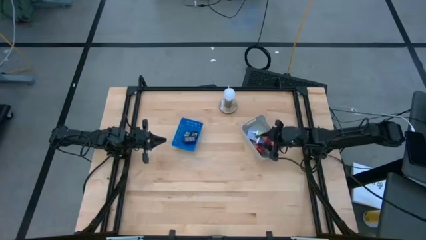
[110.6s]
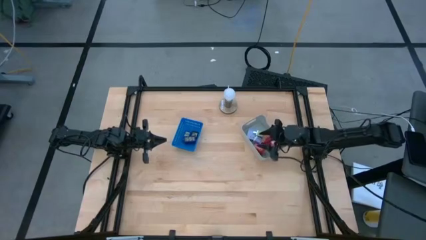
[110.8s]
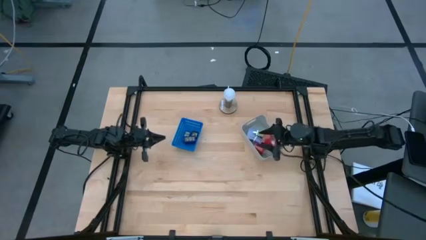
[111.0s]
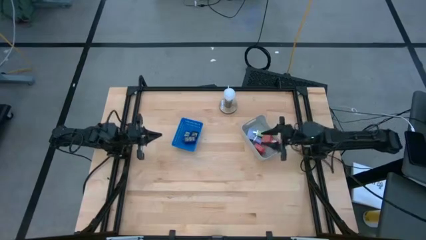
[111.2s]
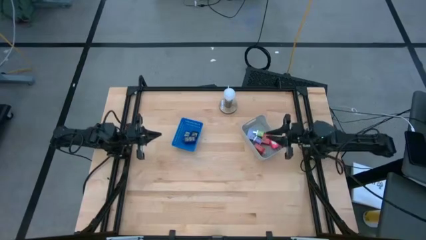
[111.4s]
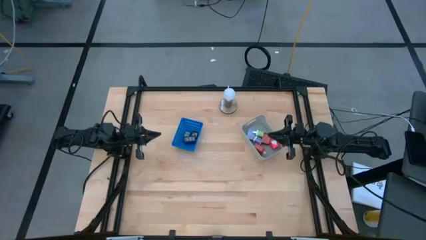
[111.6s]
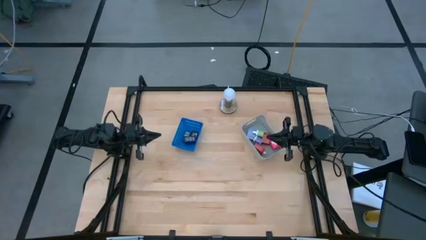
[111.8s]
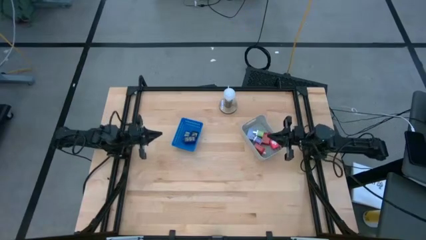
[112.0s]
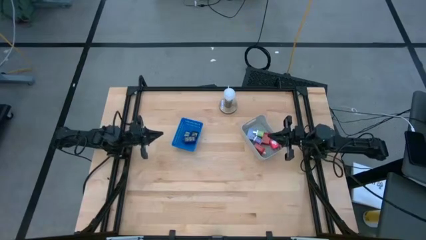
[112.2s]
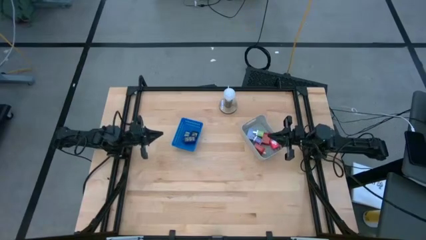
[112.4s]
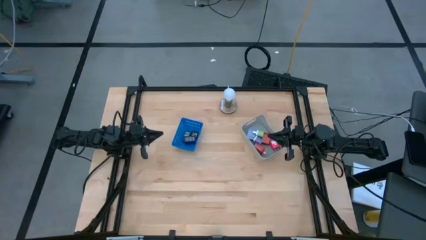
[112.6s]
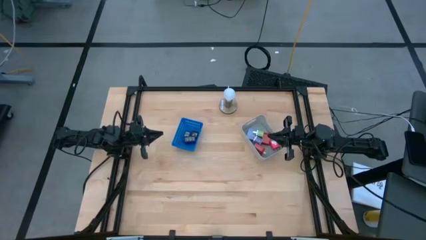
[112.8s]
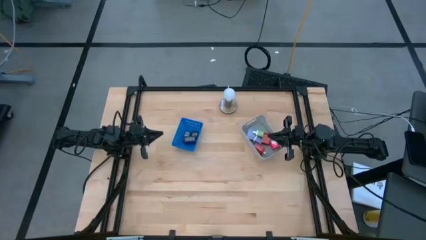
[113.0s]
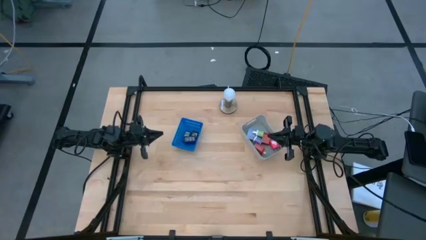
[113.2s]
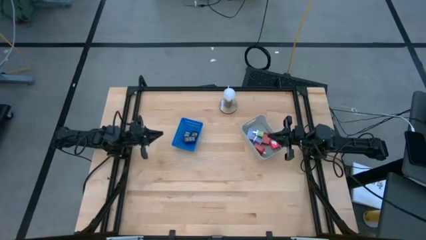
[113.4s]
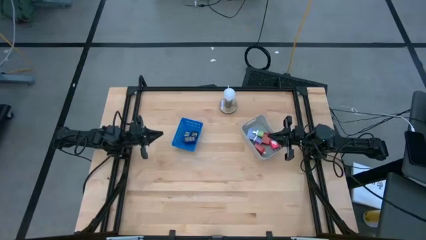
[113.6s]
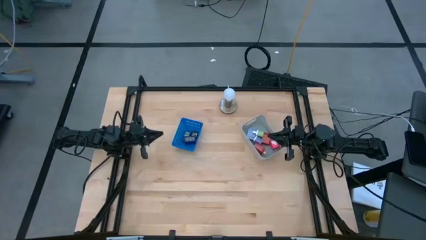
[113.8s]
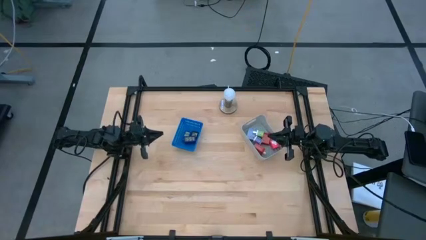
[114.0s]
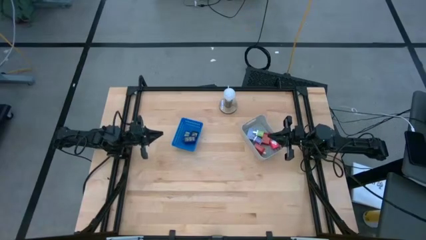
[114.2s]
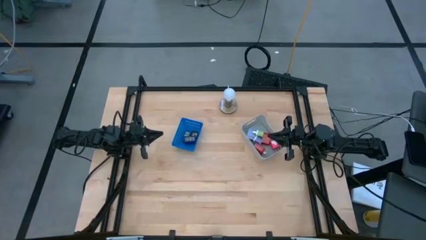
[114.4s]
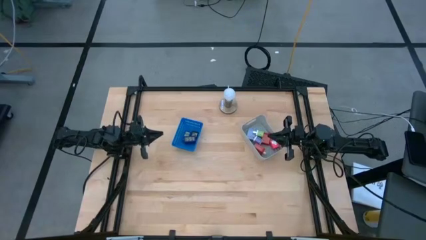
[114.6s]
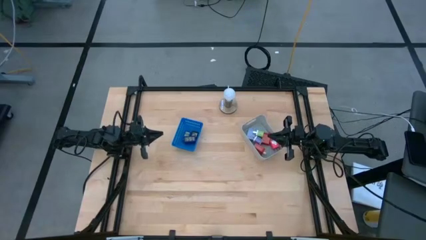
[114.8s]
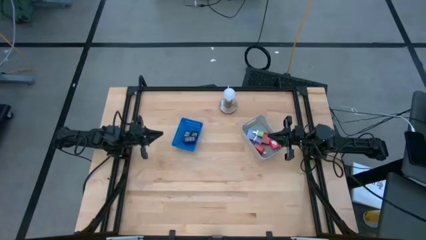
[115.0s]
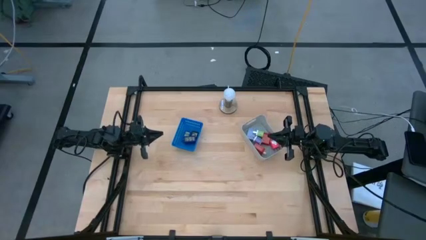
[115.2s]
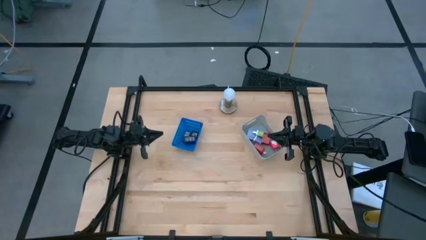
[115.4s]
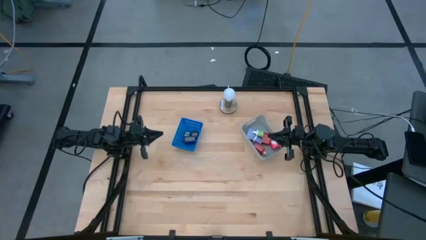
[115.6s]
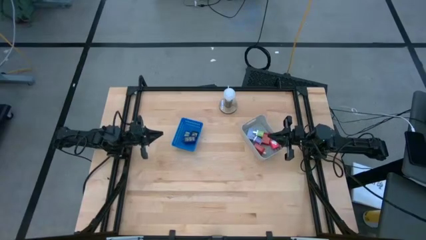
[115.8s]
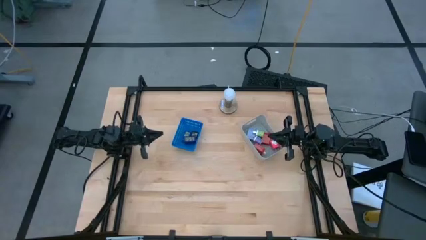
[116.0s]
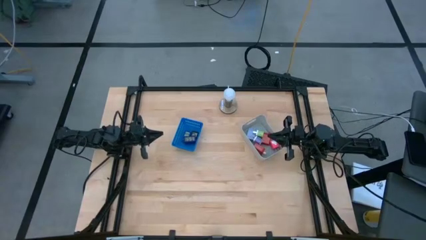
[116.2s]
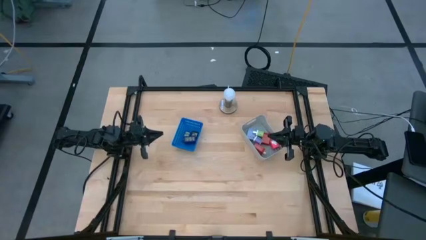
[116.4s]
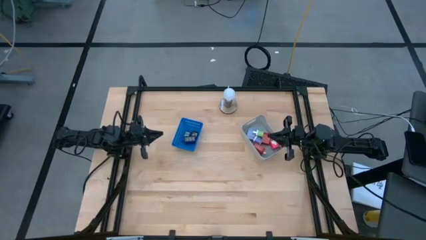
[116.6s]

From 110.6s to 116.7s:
Task: Pick & Place Office items
Return to Home Position

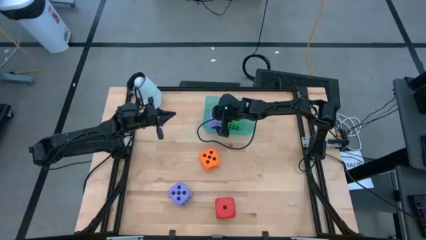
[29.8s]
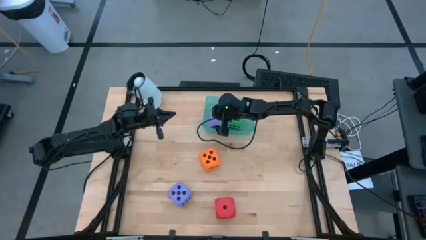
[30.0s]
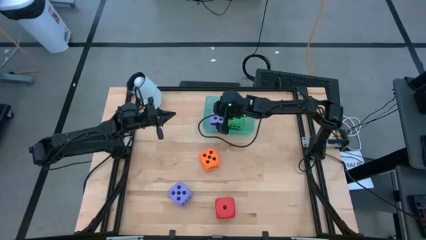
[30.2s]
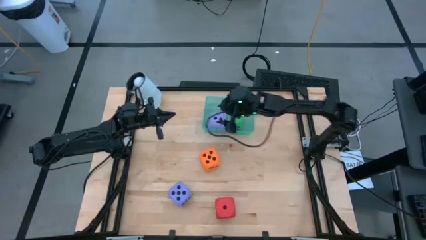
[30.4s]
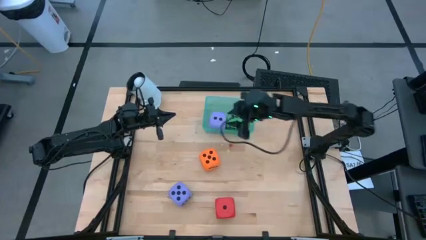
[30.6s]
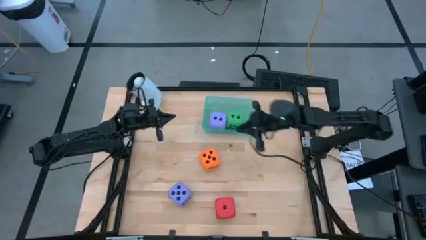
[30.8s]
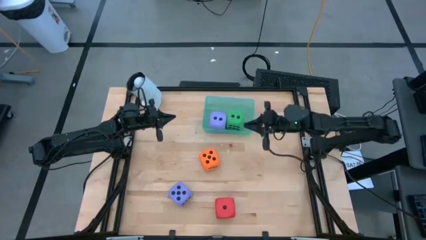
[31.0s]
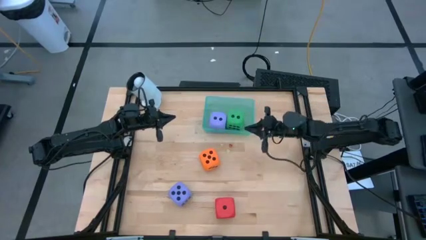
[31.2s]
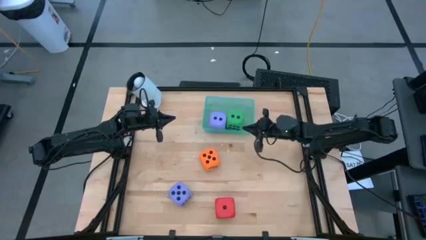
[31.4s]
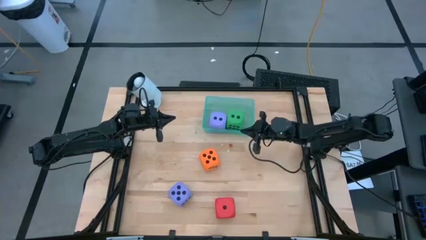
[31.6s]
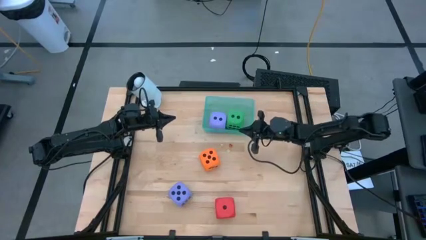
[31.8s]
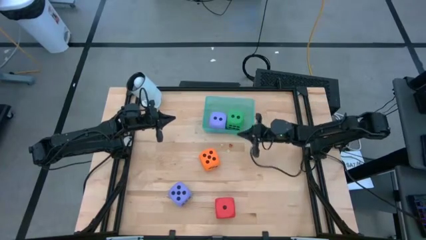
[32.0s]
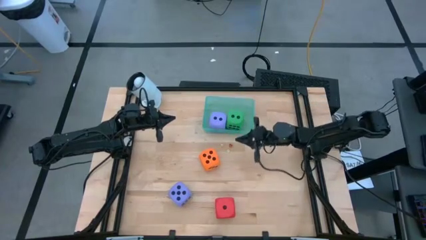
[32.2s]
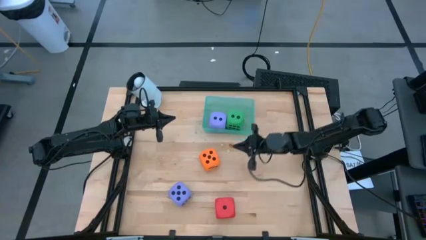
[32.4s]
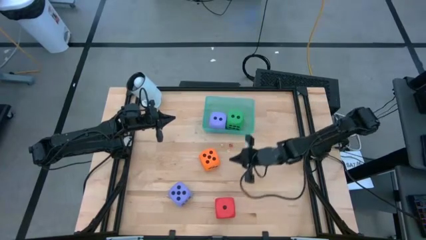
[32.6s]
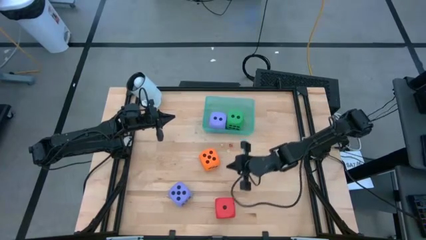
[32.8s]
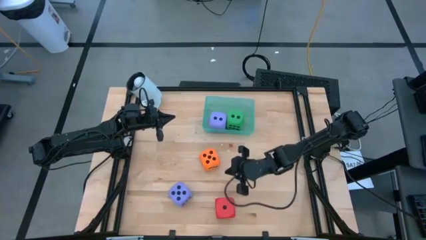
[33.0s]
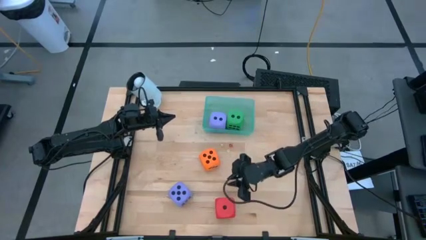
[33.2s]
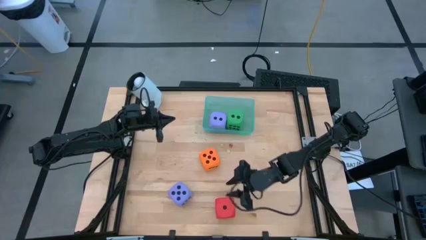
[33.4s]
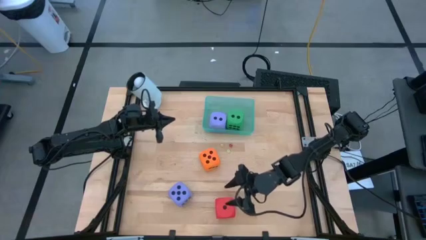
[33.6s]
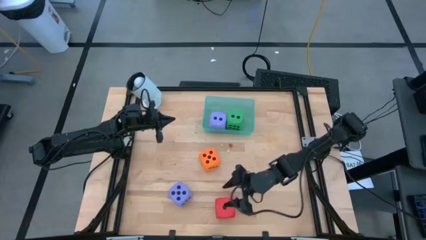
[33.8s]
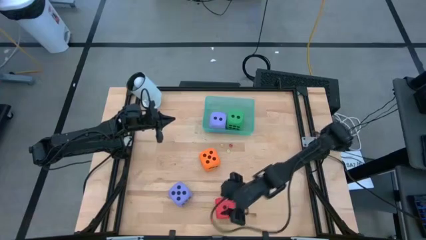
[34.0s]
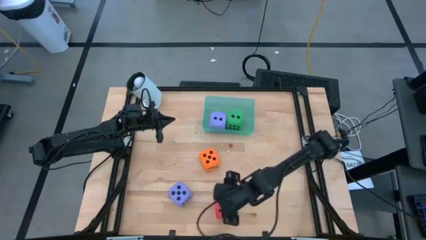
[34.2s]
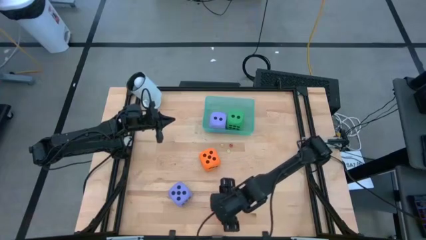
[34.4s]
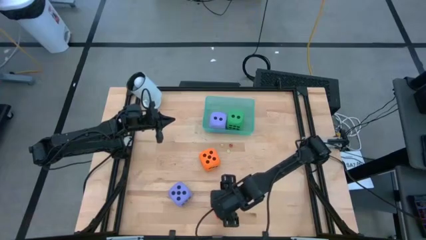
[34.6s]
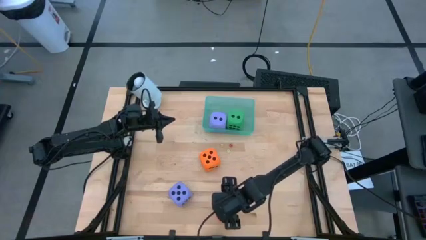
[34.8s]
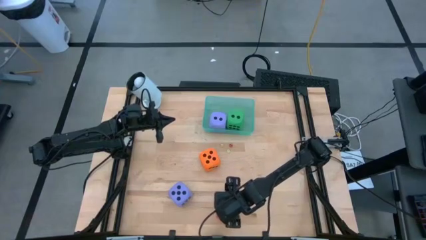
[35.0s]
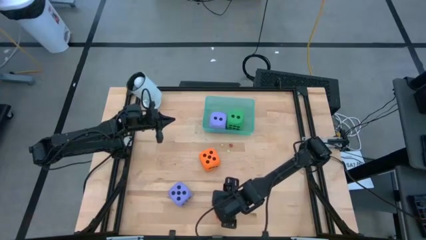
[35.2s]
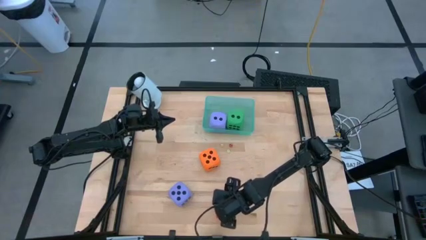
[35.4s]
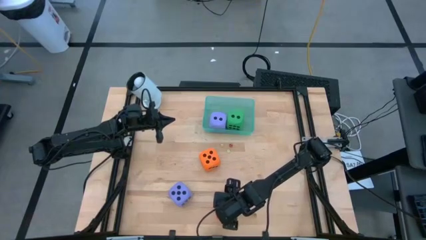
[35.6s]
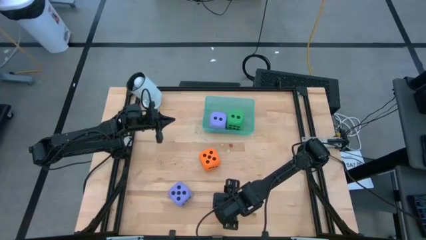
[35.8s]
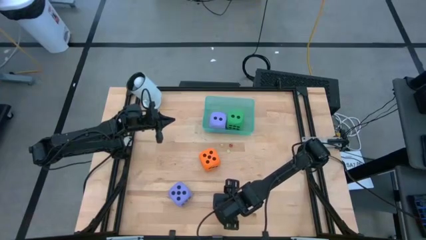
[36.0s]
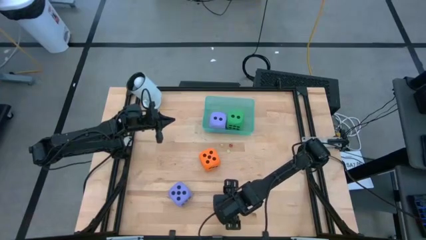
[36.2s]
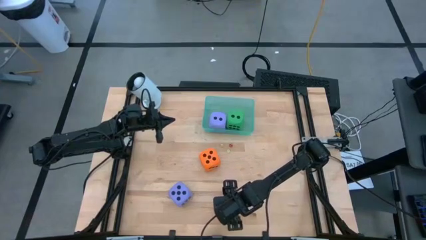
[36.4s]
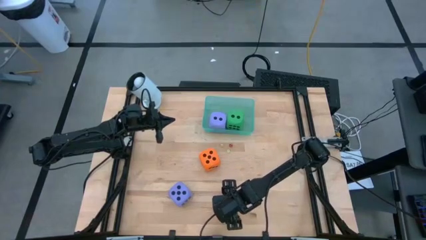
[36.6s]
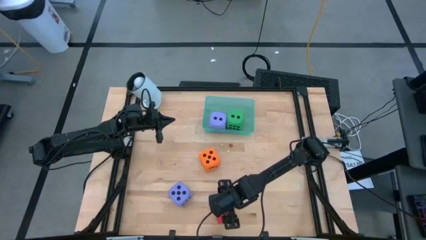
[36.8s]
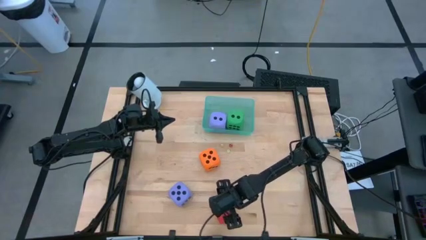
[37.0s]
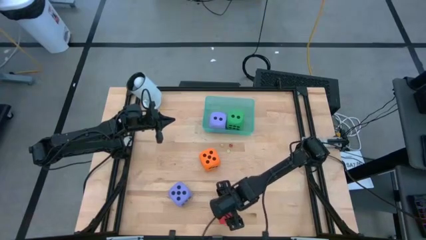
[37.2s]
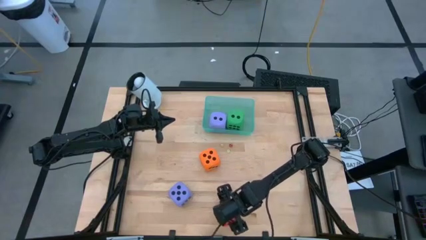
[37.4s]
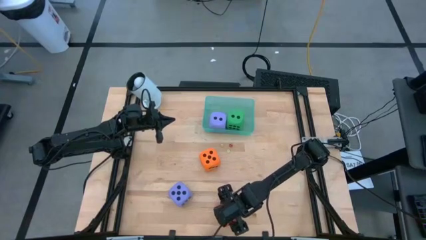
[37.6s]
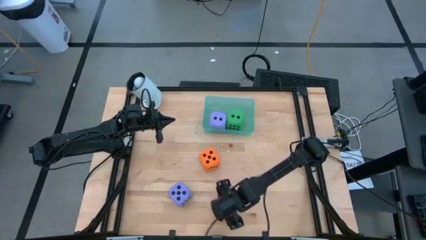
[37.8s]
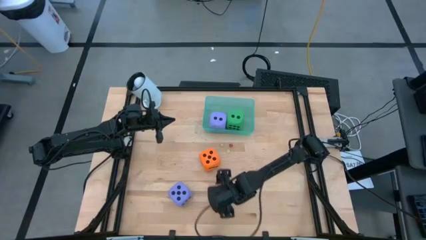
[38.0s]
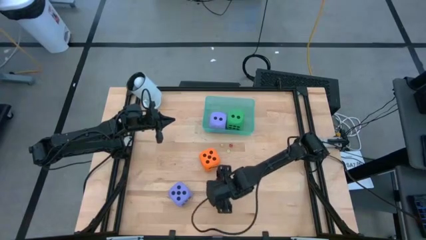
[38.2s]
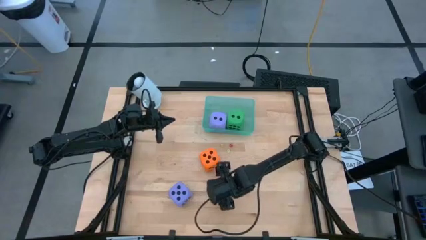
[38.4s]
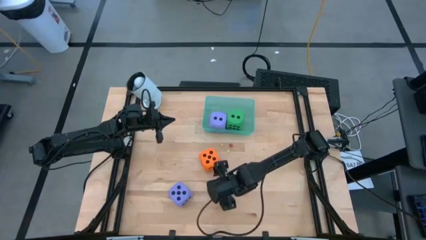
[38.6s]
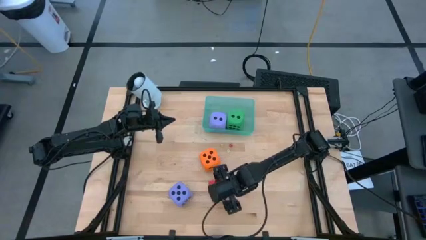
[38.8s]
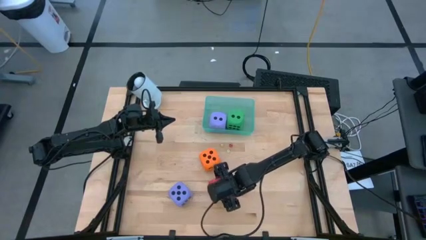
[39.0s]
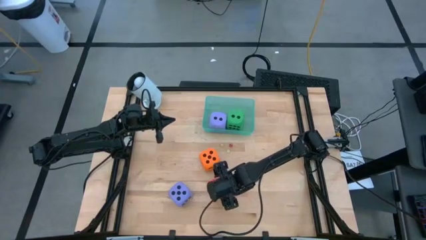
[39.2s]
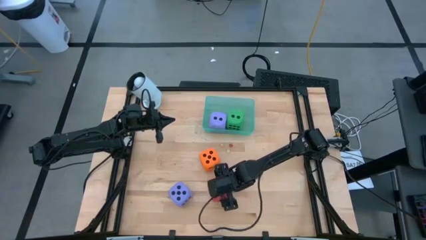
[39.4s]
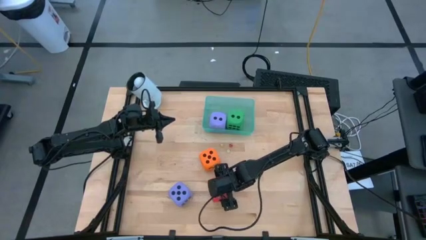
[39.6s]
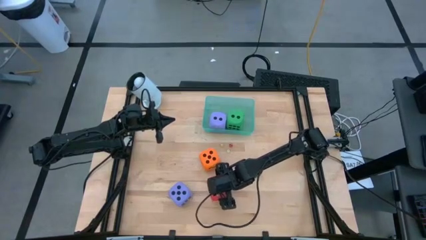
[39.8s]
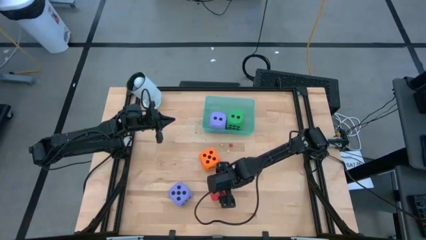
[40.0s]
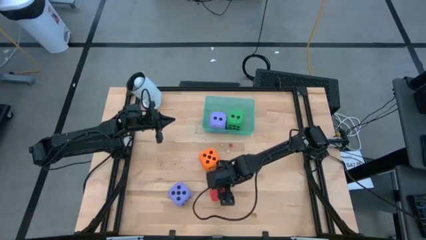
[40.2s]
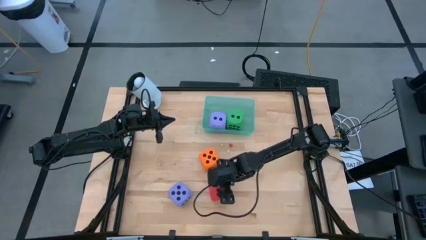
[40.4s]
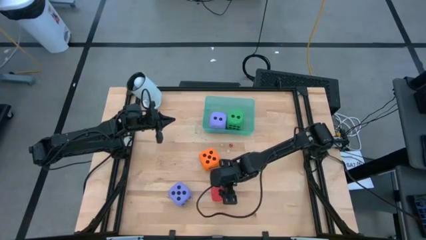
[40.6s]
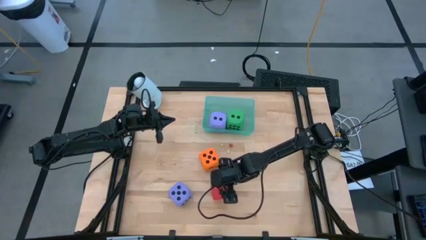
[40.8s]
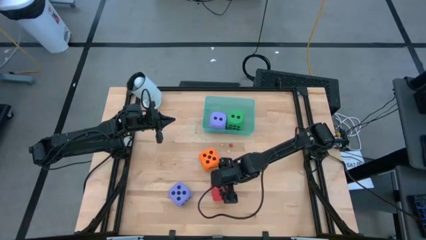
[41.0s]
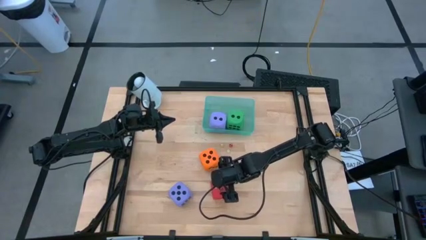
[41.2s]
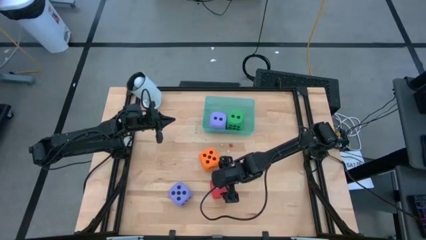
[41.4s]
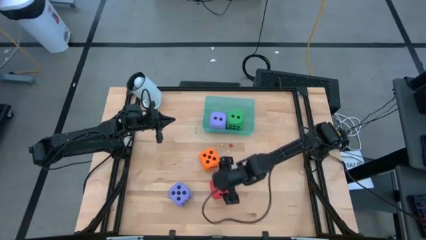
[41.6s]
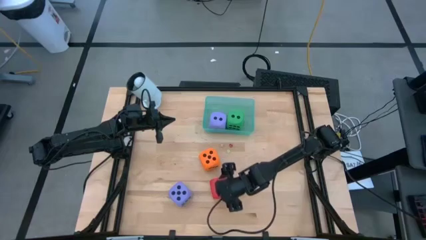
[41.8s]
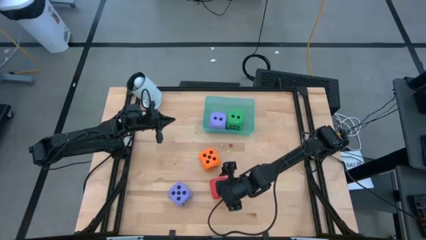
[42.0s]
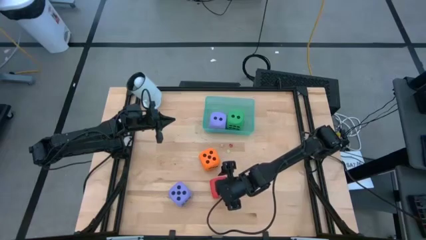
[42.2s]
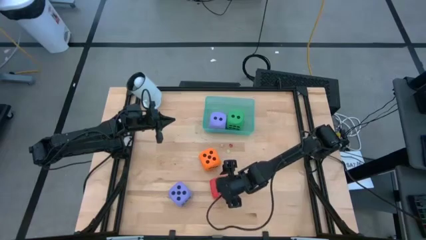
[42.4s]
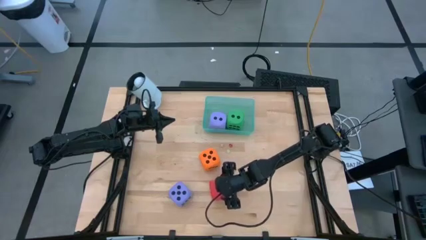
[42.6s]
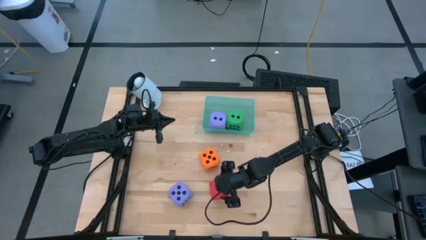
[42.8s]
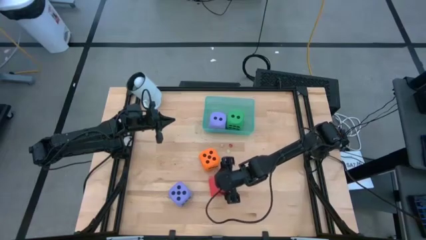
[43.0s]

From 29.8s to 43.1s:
Task: Pick & Place Dice
Put the large red dice into the light blue bin
